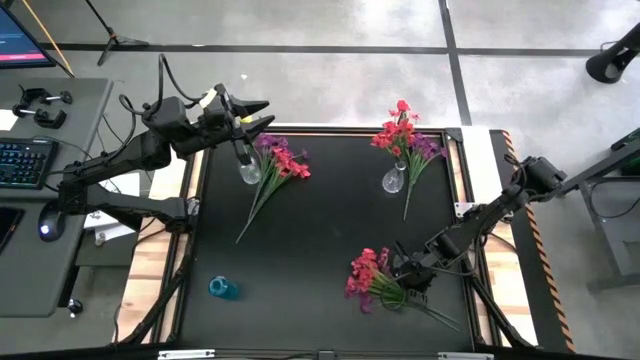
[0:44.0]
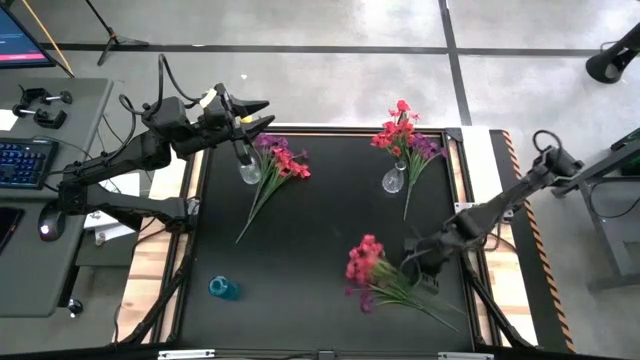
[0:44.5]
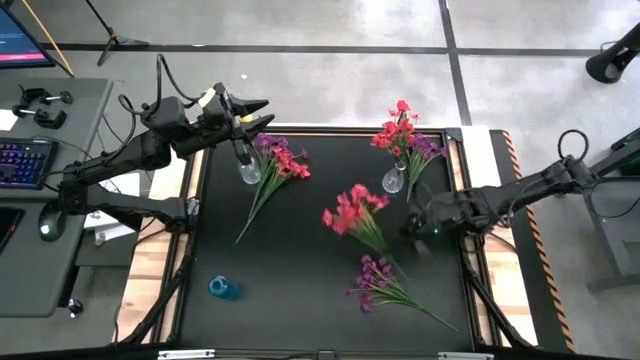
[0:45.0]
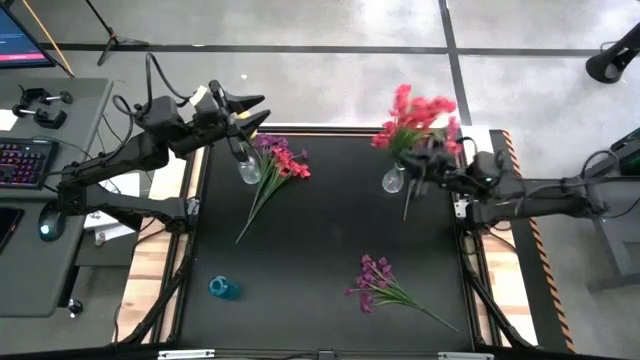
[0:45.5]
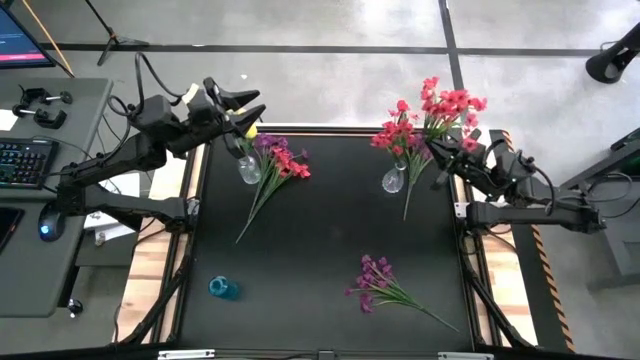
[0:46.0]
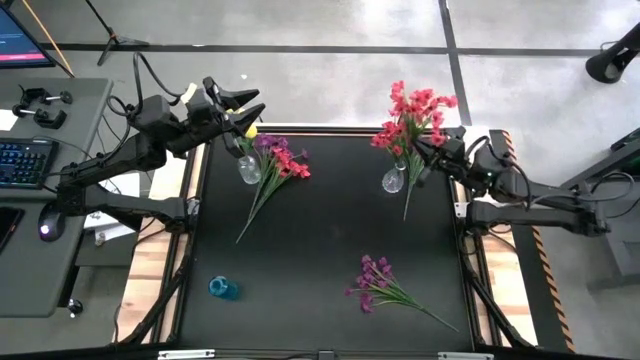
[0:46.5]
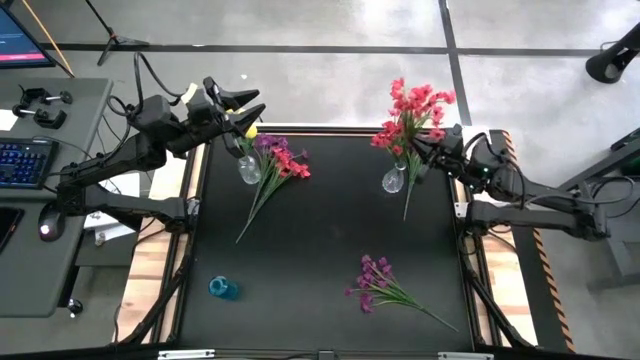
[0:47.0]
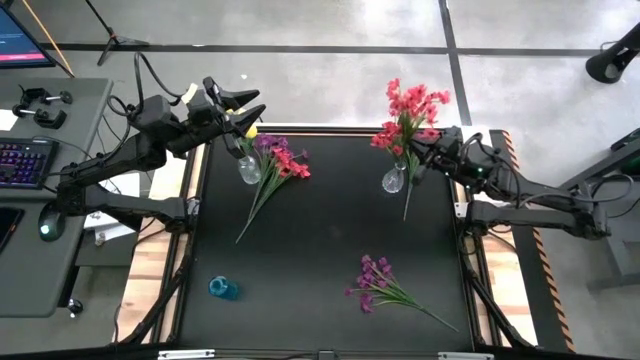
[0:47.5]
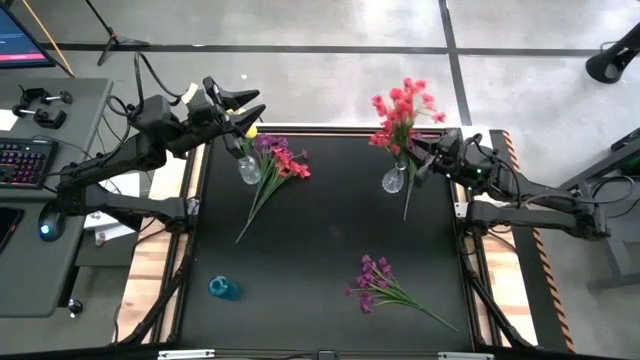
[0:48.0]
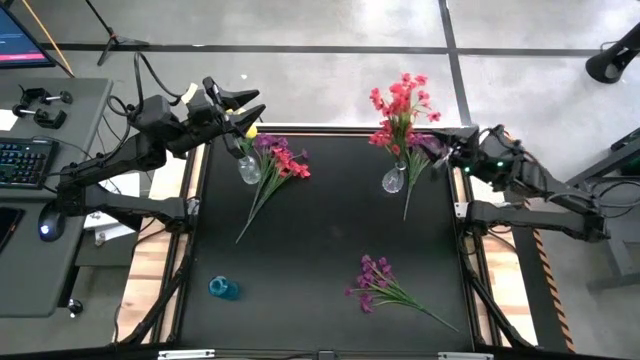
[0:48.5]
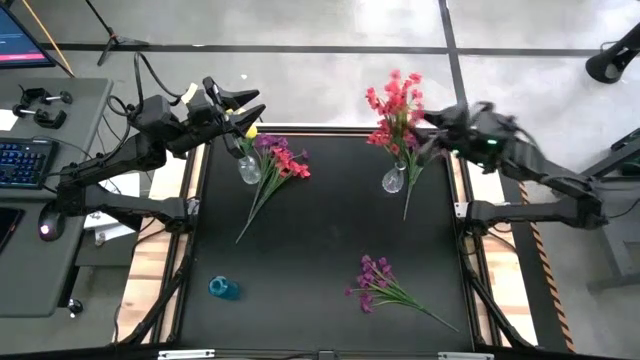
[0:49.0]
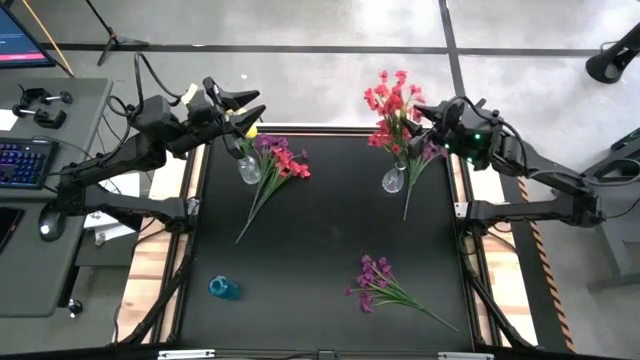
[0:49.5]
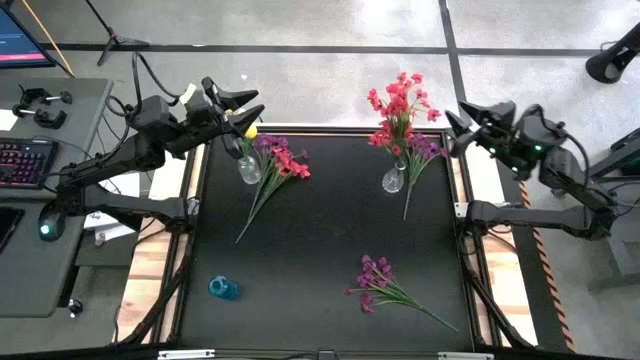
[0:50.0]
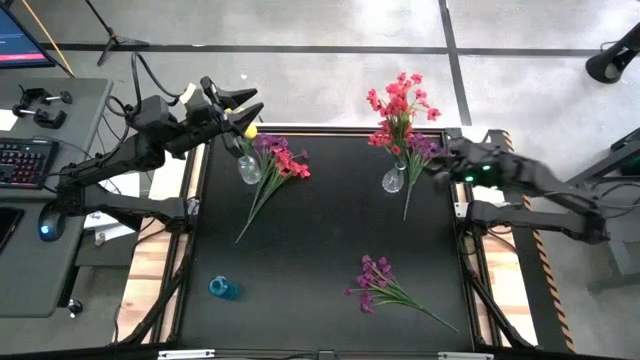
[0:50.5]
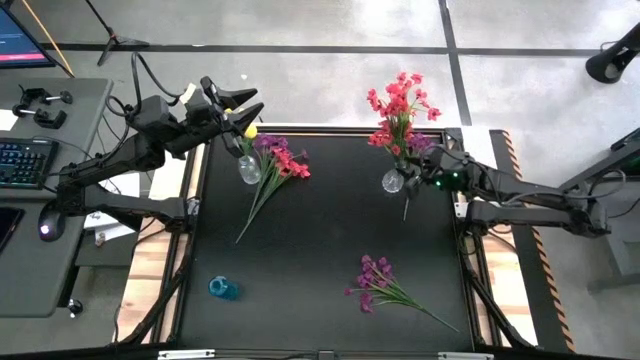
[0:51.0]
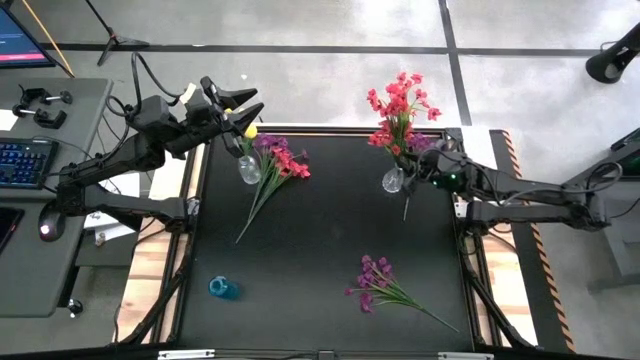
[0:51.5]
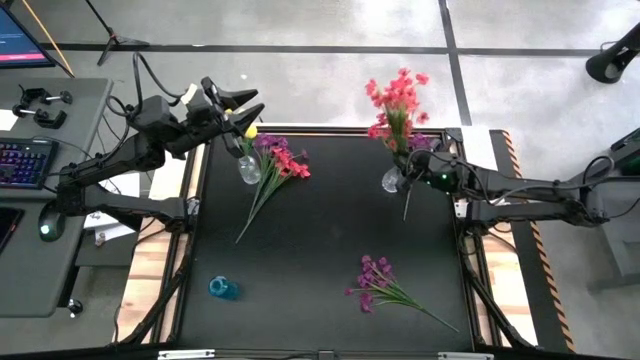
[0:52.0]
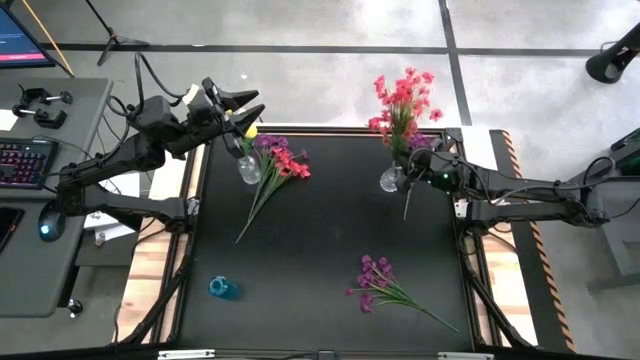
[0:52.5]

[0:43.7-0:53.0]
Task: Sort flowers into vase by color
Put the bottom red flowers into the right transparent vase

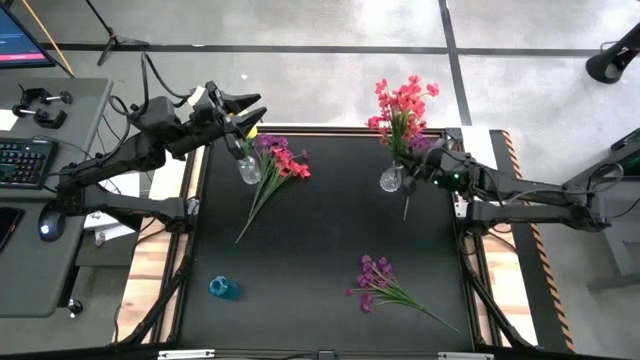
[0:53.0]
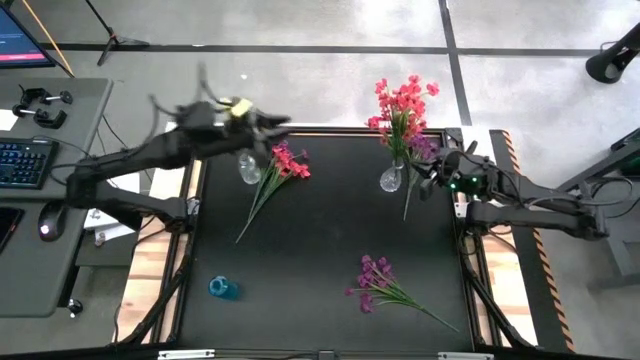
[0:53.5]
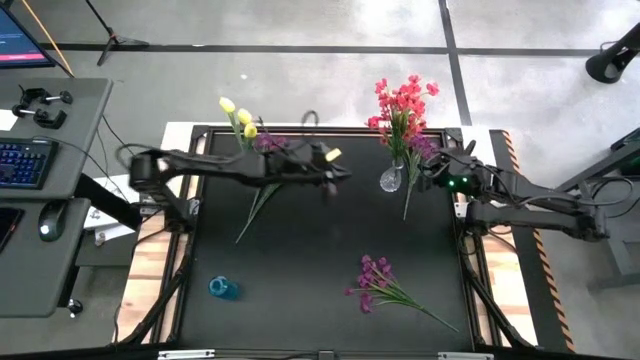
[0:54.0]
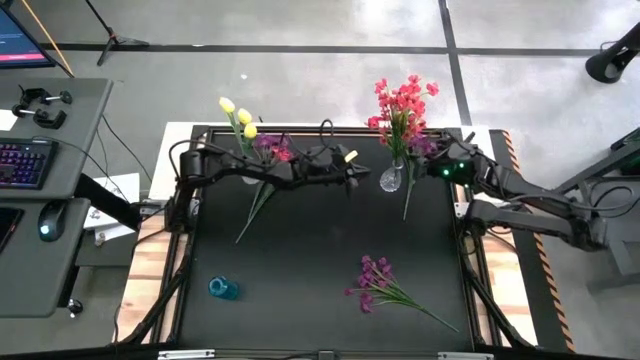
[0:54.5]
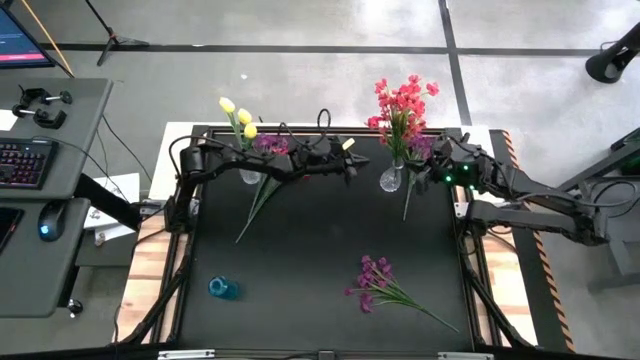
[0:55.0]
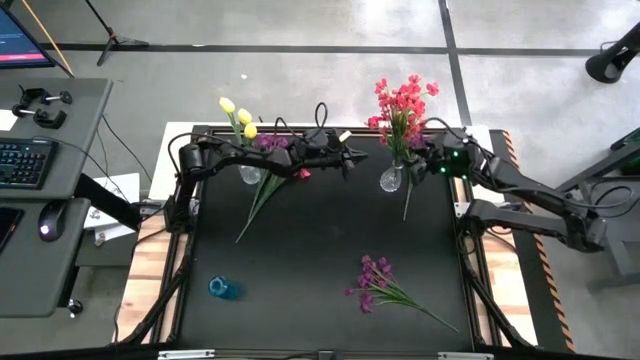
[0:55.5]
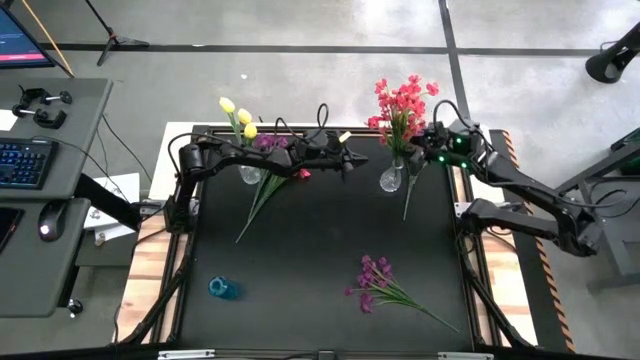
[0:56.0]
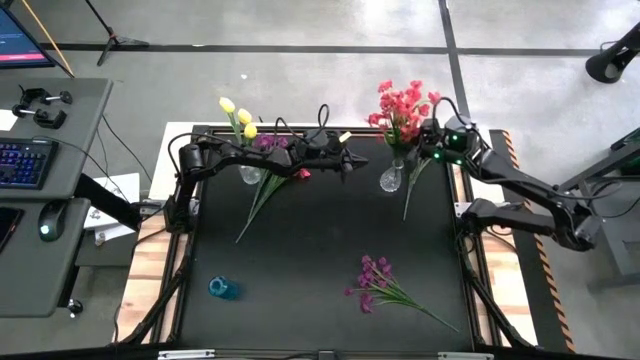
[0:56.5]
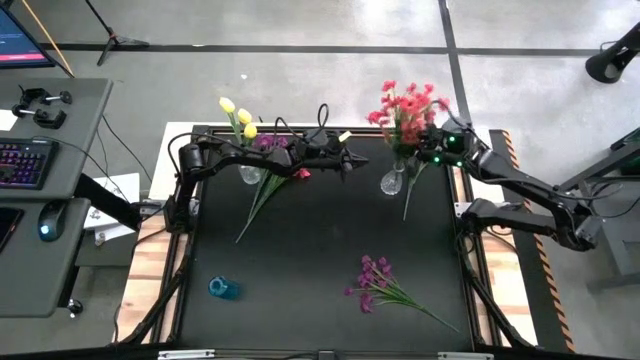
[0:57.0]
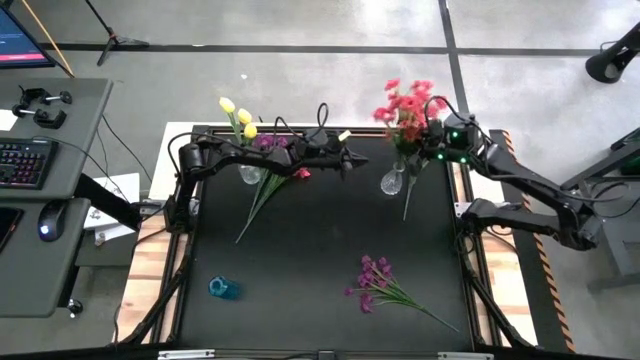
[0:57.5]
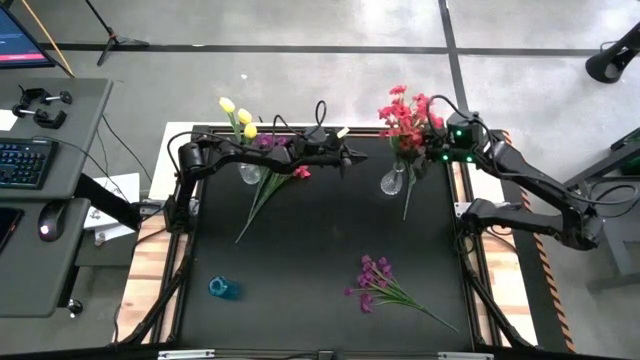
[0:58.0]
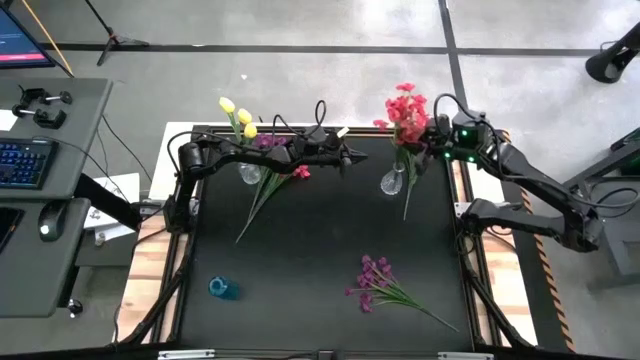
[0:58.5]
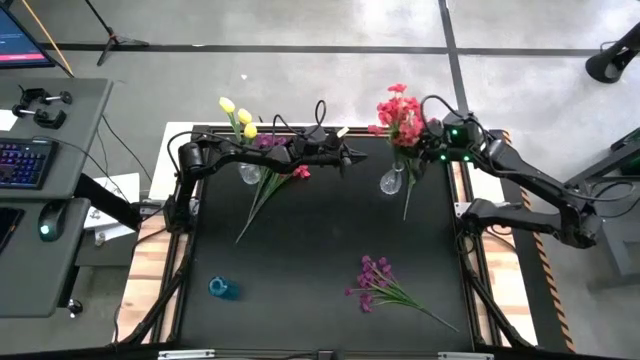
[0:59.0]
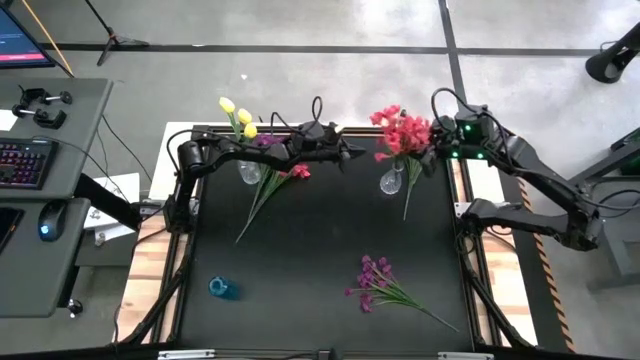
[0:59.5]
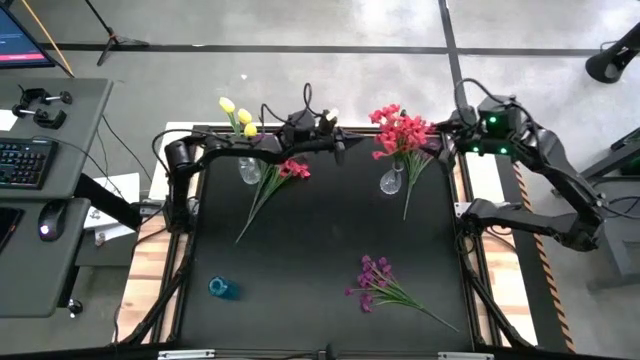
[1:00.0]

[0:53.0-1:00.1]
Adjust the red flowers in the right transparent vase

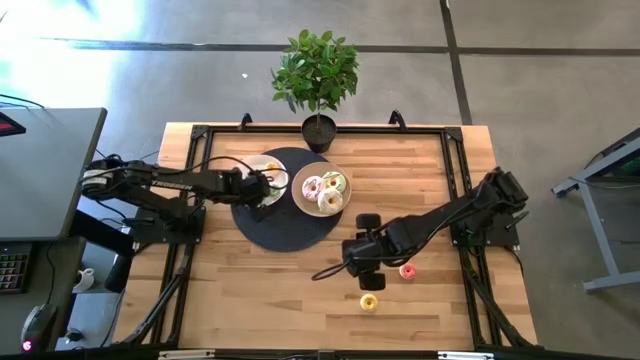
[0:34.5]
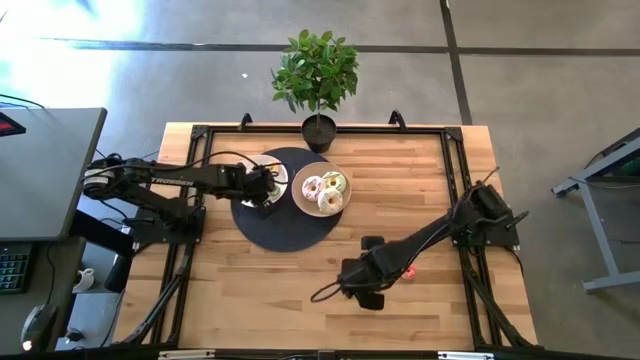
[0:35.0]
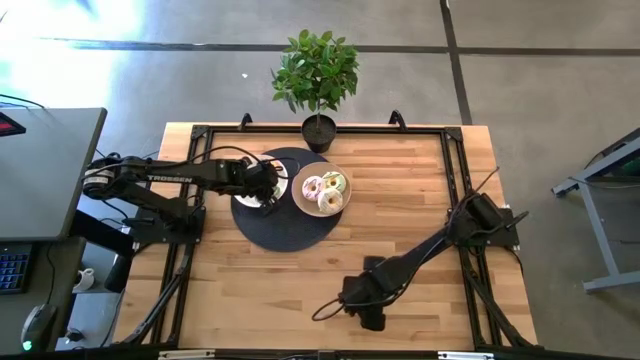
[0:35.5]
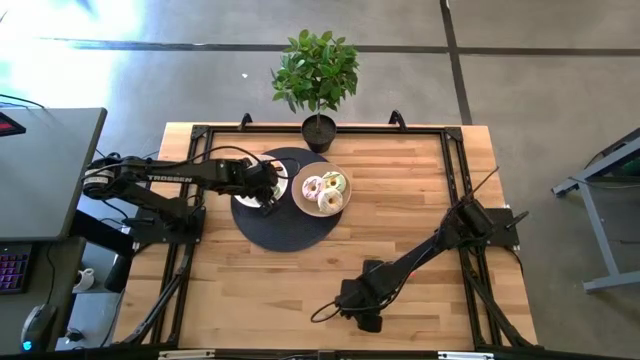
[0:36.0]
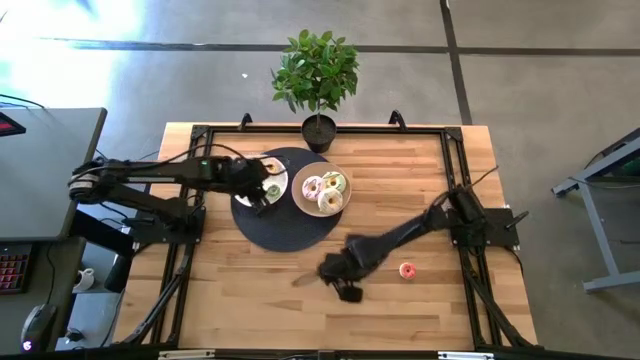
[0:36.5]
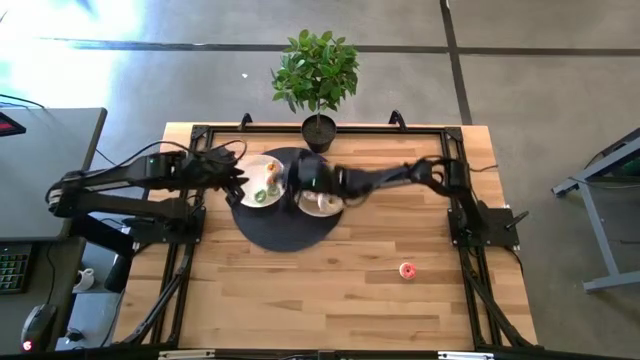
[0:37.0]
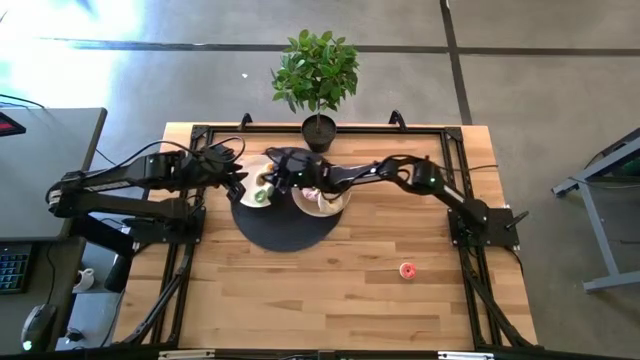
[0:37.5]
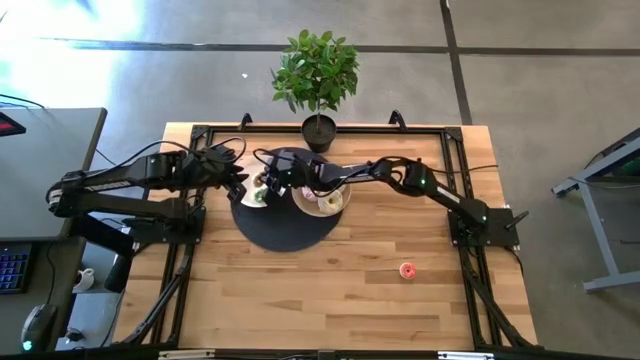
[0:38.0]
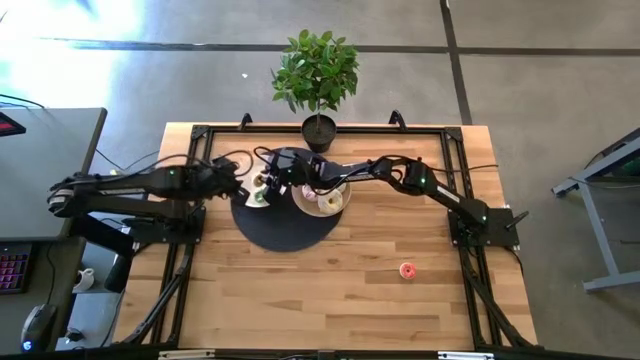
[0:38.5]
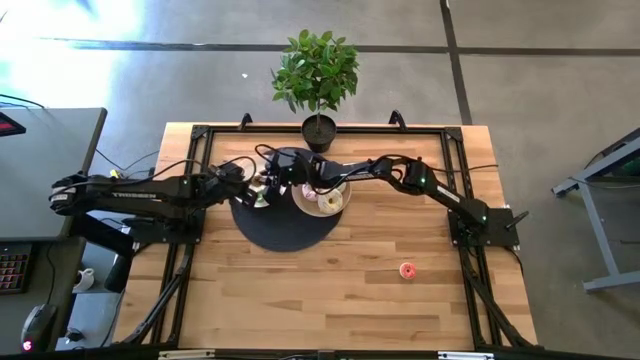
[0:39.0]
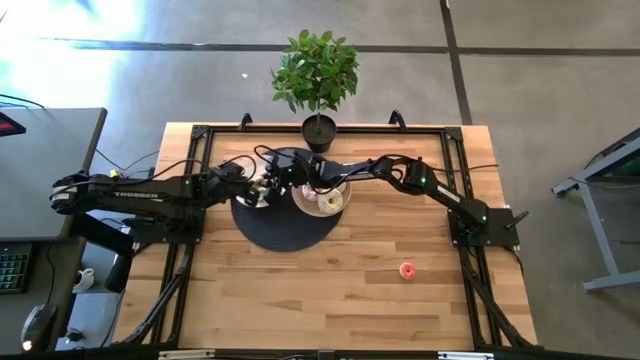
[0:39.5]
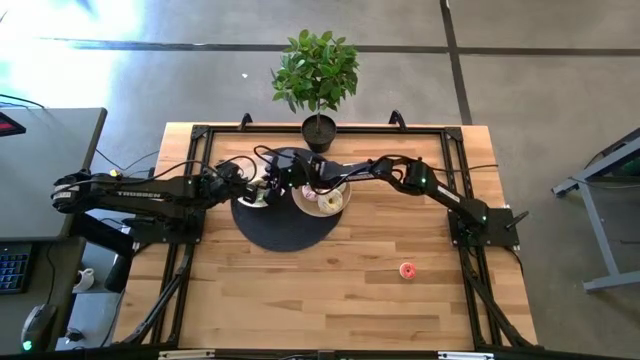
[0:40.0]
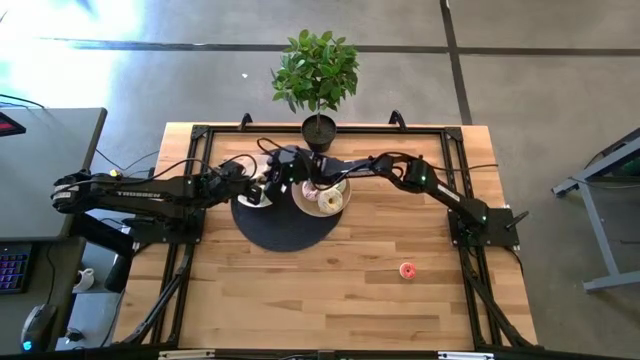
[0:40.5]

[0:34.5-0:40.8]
Task: Pick & Place donuts
Put the small yellow donut onto the white plate
